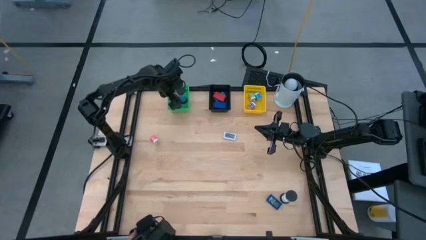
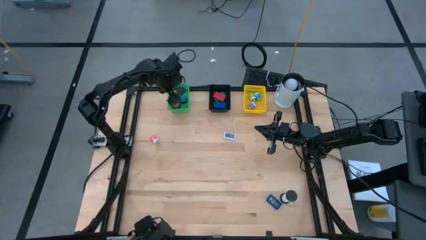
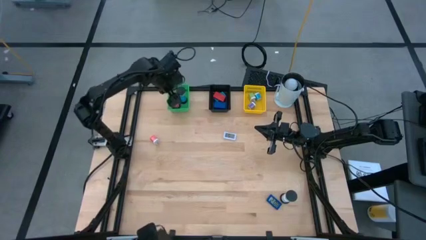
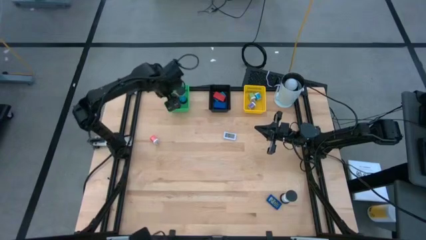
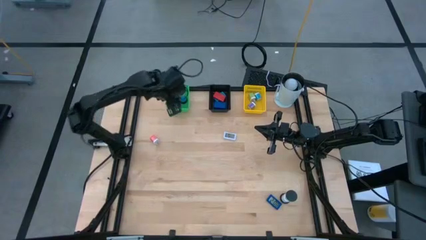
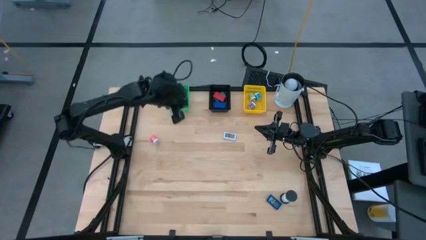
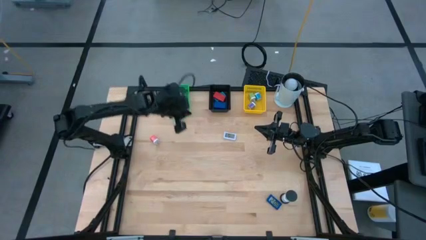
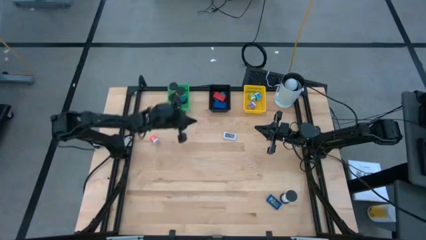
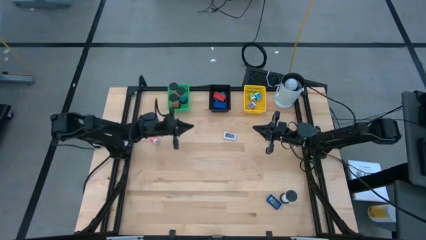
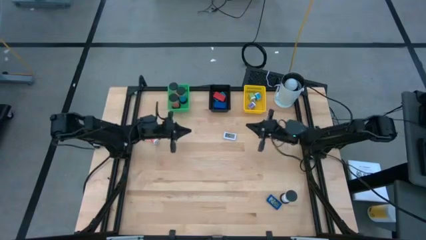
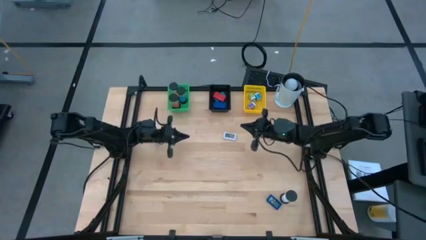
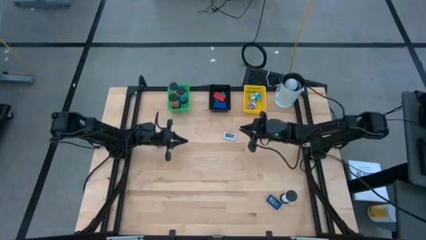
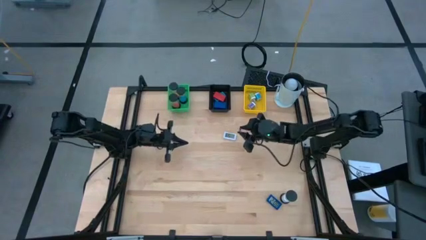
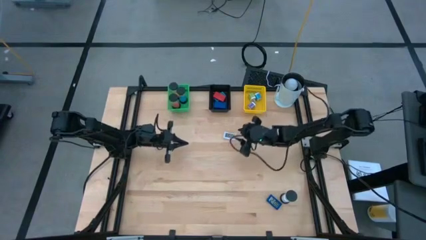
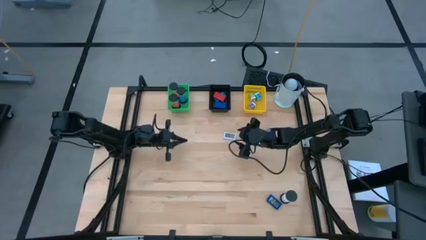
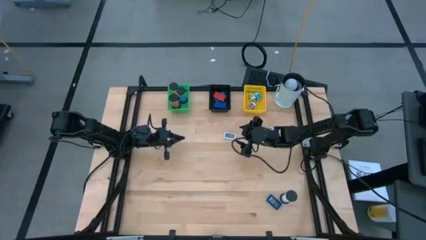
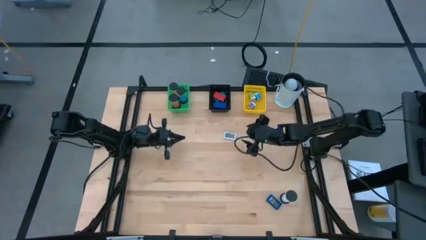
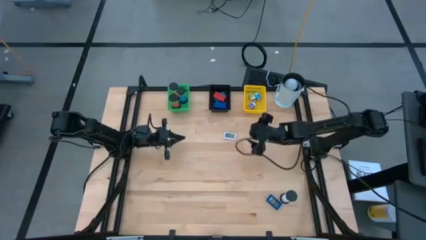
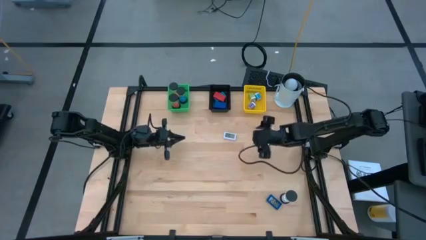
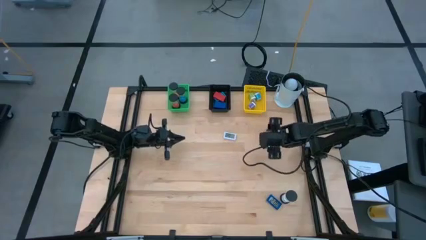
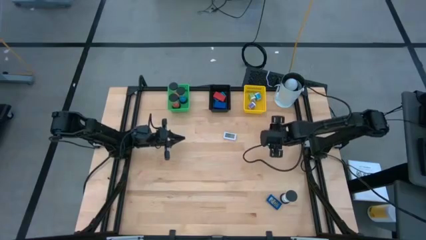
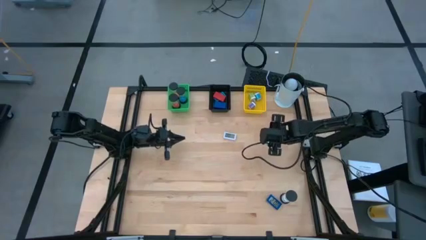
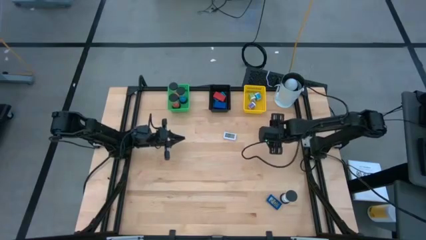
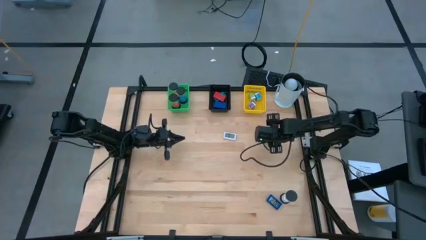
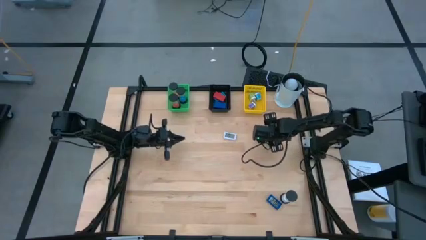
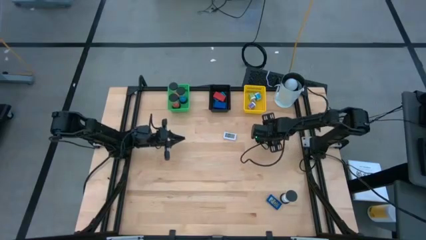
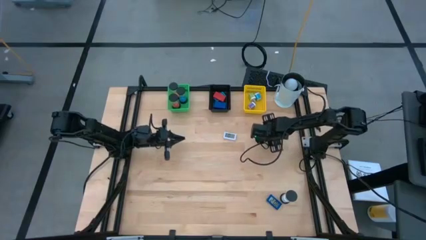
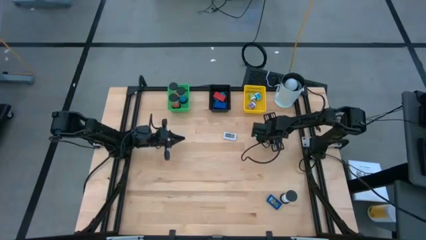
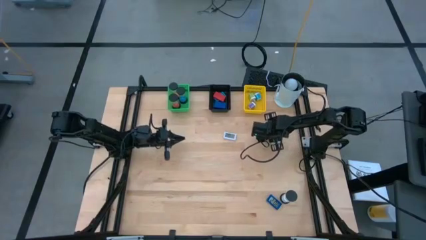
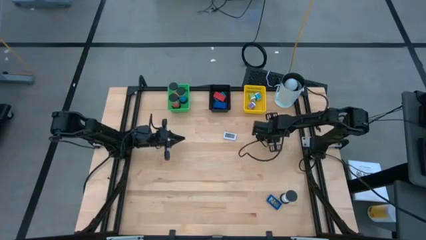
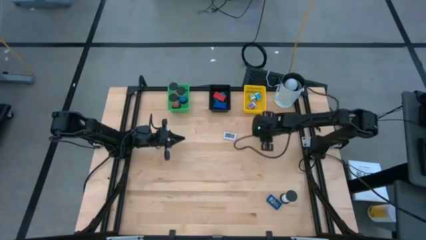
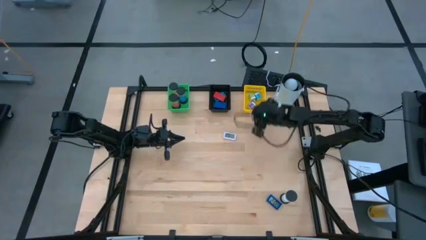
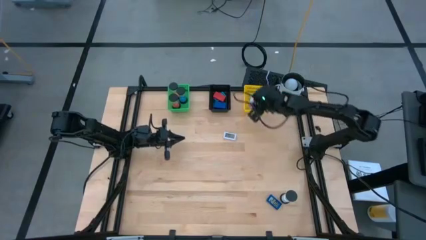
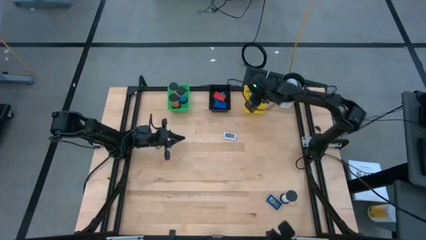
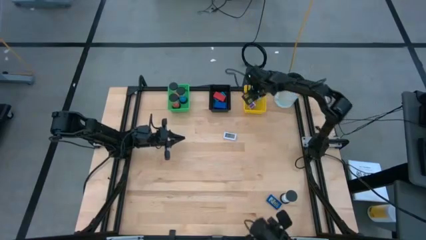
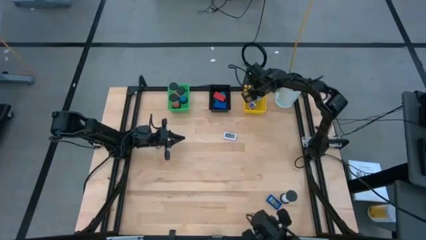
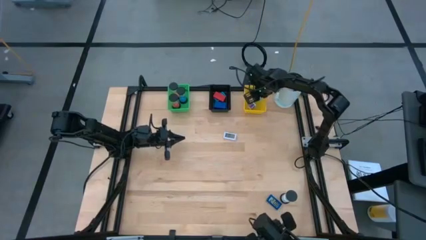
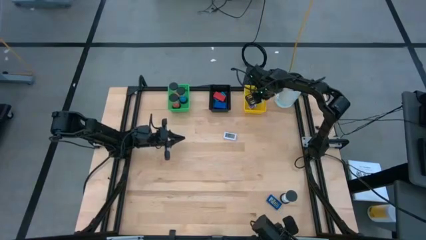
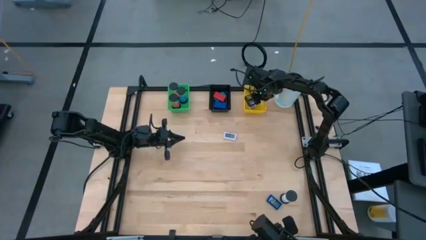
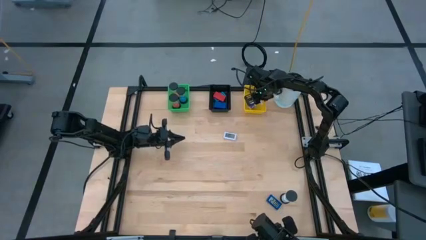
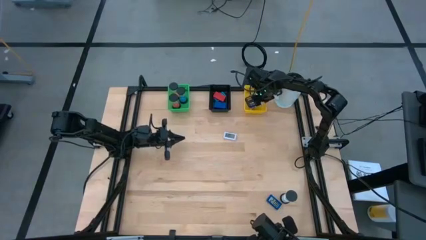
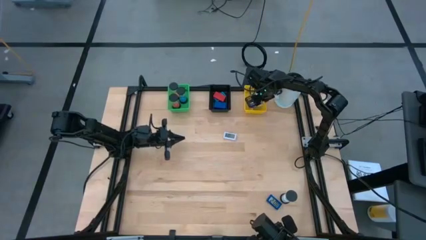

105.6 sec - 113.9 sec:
Task: Pick & Place Office items
Put the purple charger adapter into the yellow bin

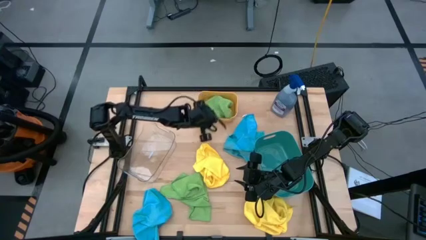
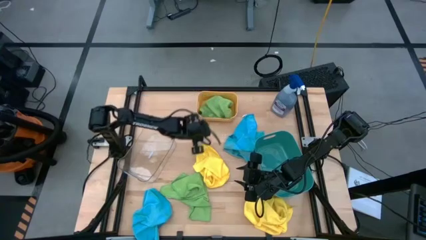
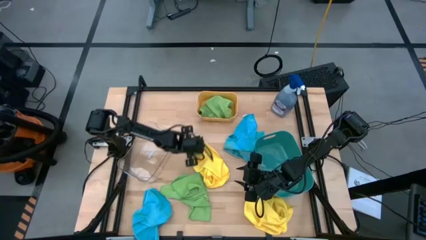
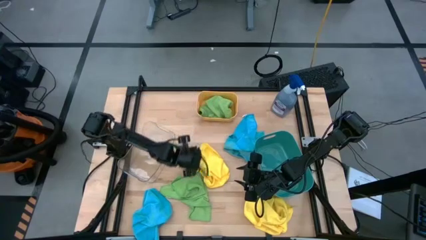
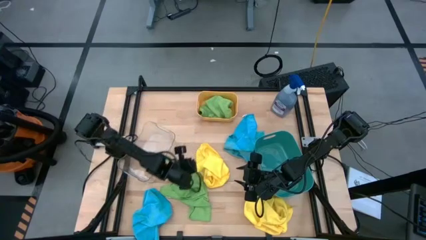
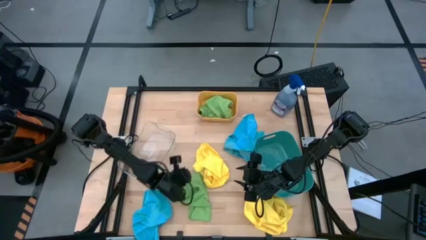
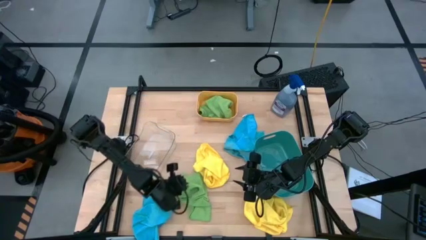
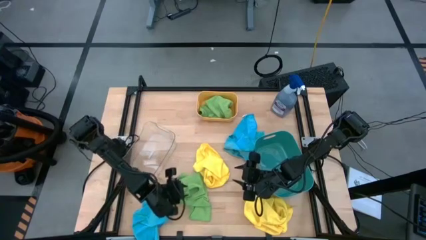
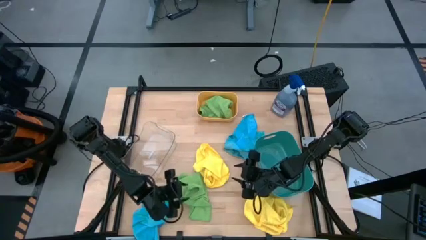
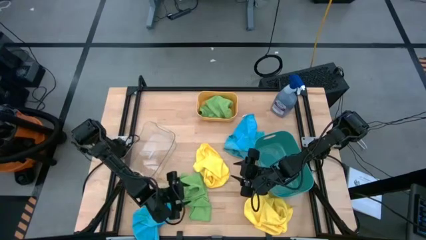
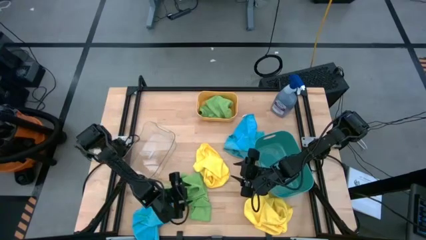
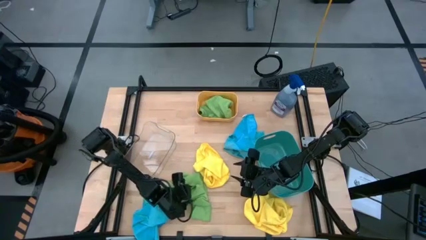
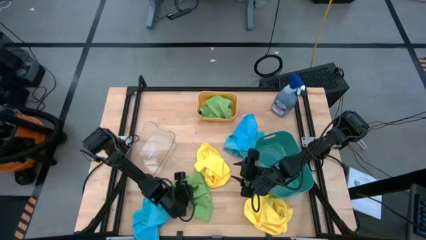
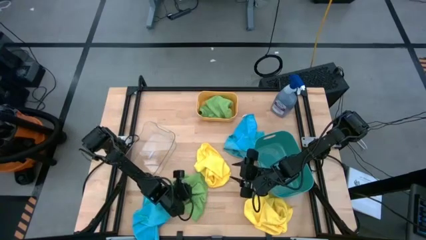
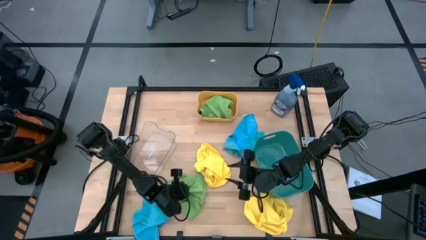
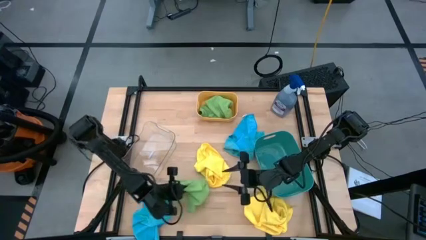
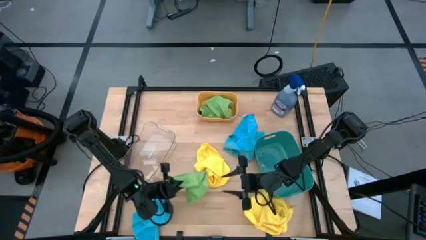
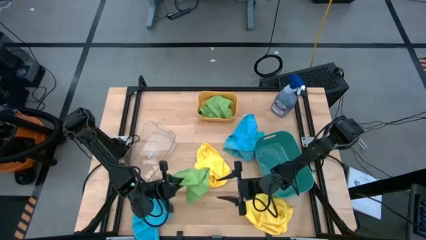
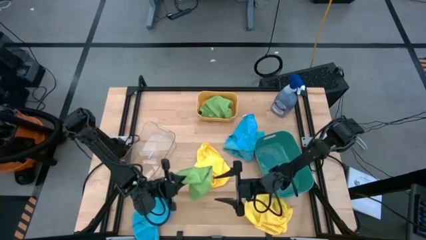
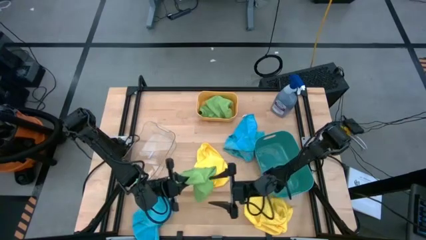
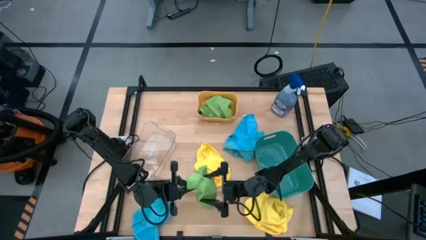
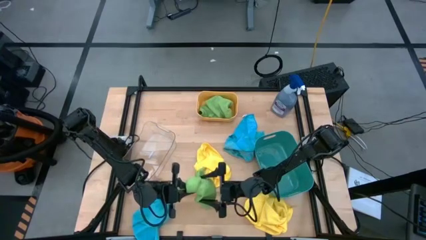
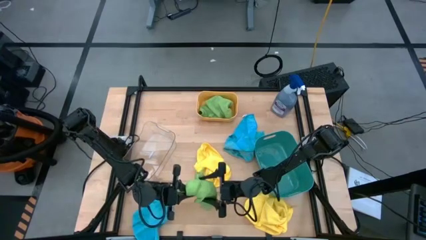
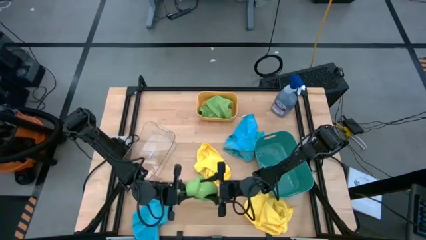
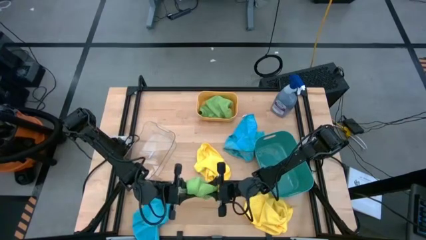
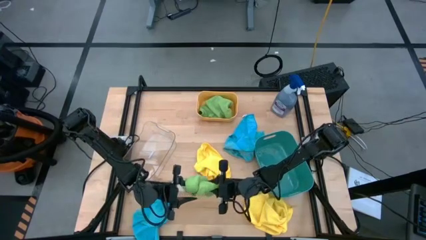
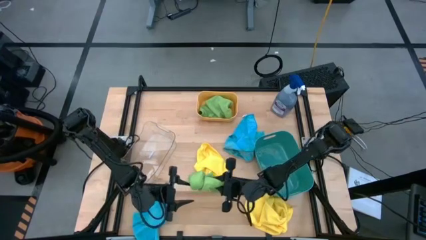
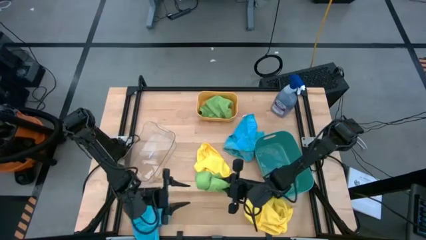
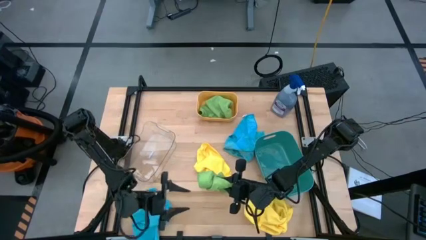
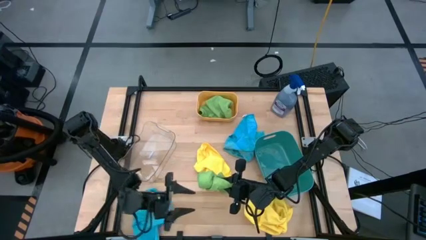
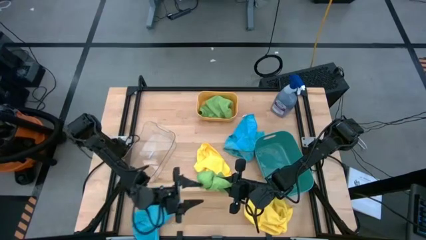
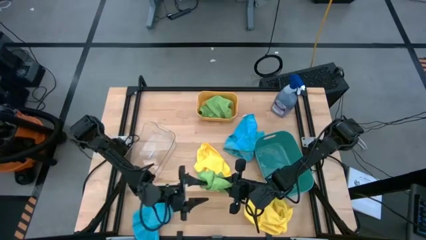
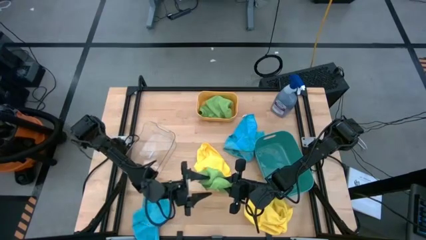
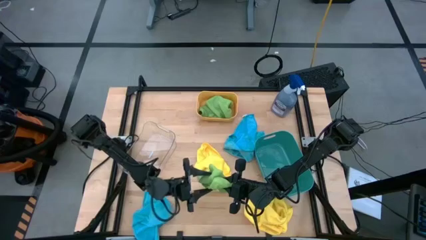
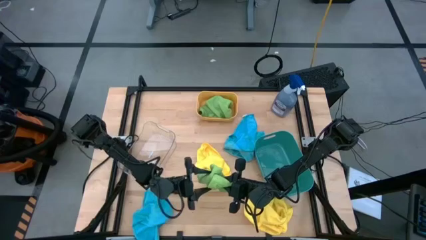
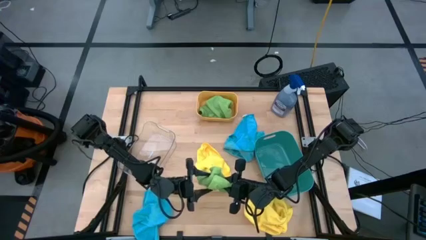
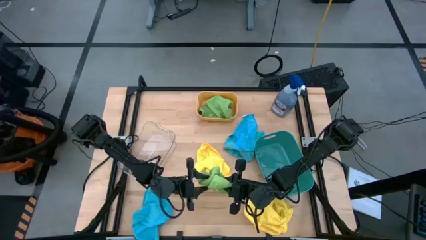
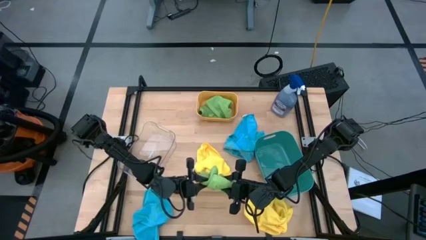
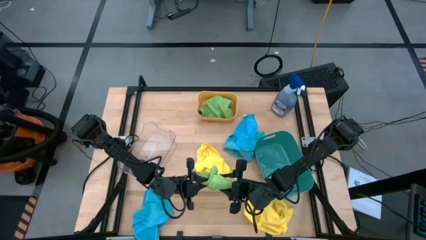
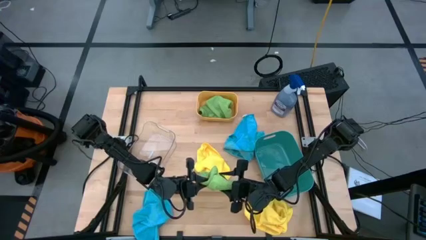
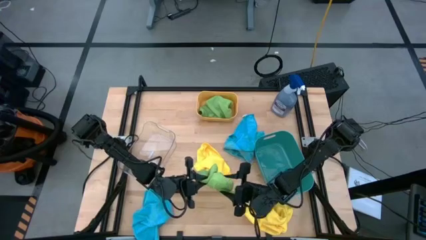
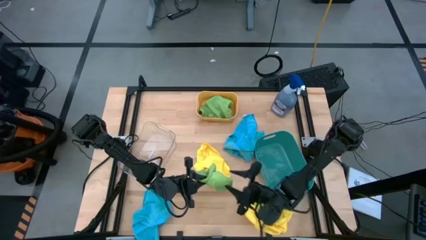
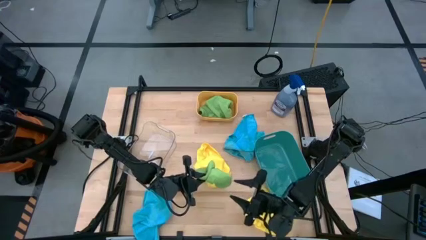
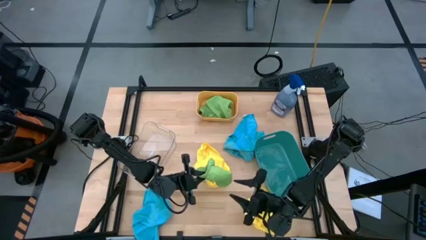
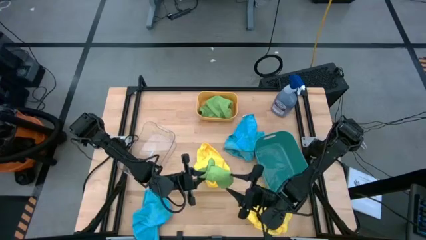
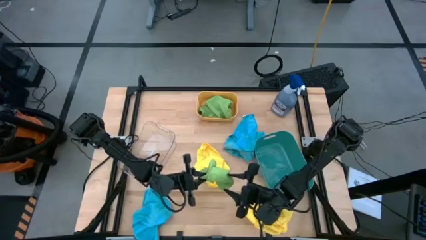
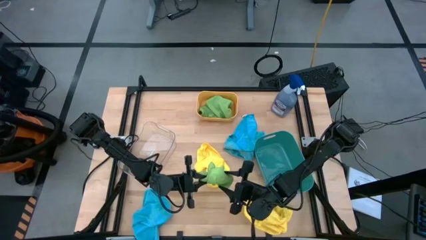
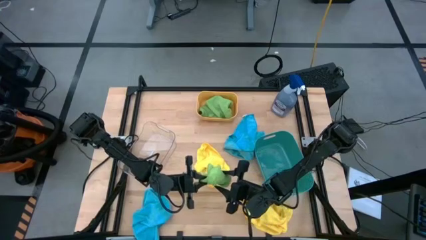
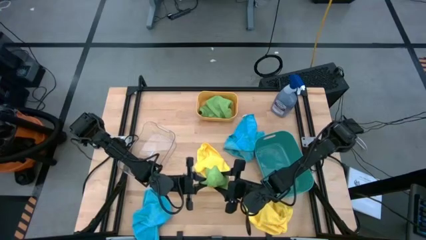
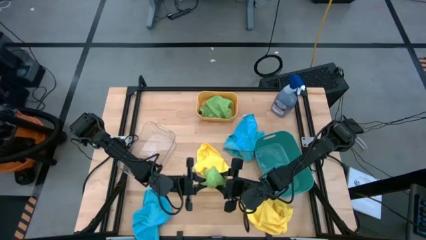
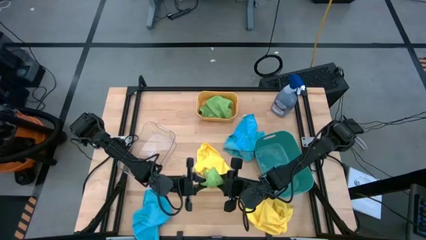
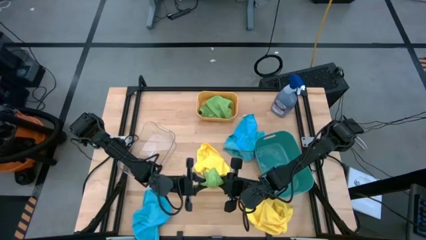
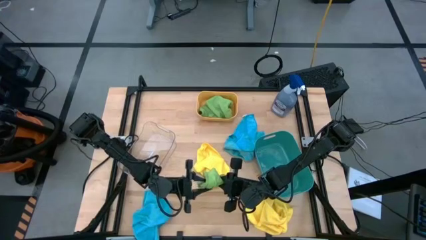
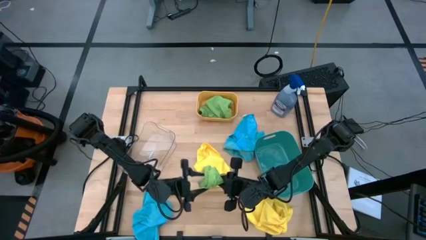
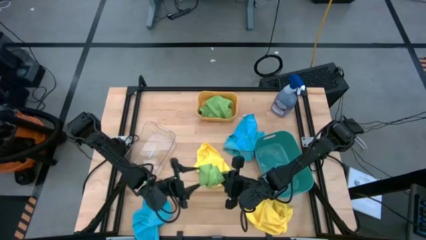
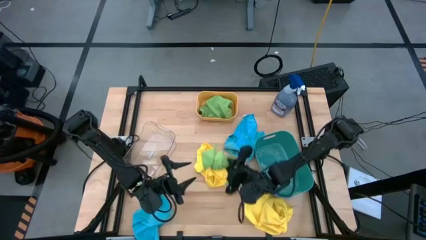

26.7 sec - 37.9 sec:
Task: Sort microfiber towel by color & place in baskets
Put the green microfiber cloth into the orange bin
